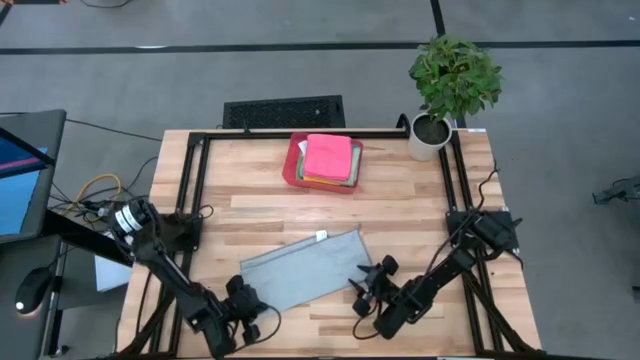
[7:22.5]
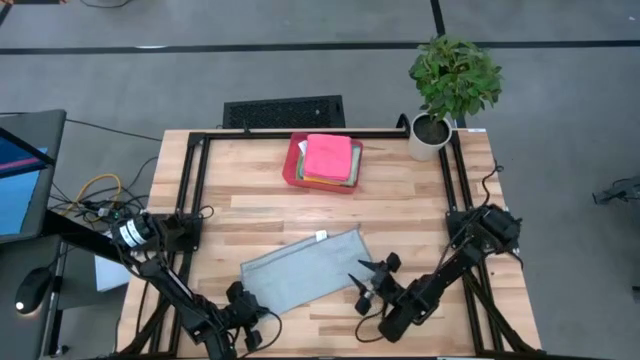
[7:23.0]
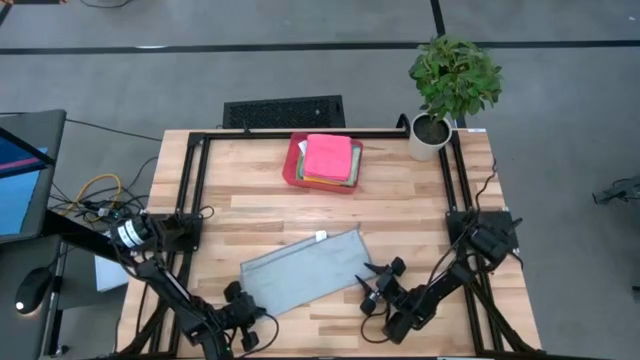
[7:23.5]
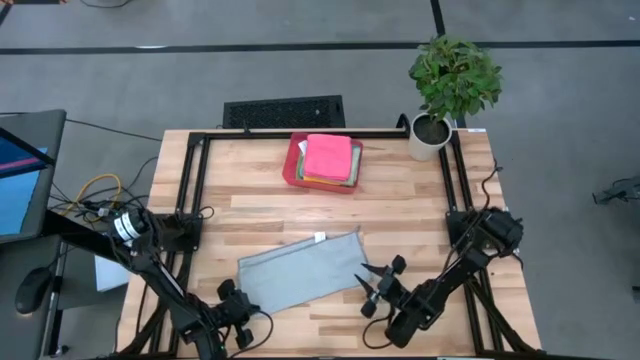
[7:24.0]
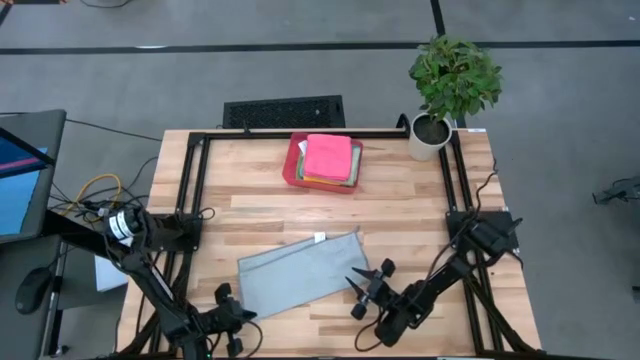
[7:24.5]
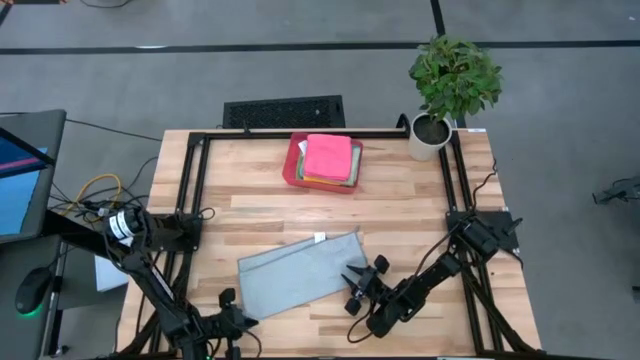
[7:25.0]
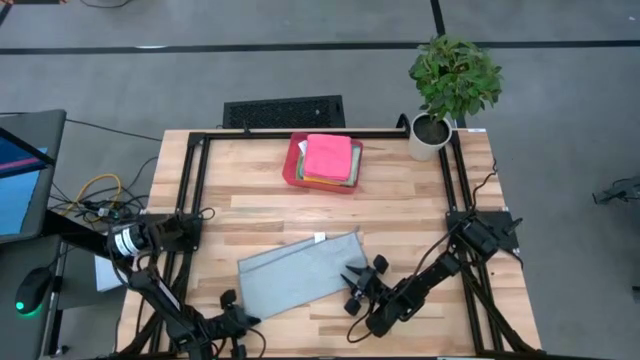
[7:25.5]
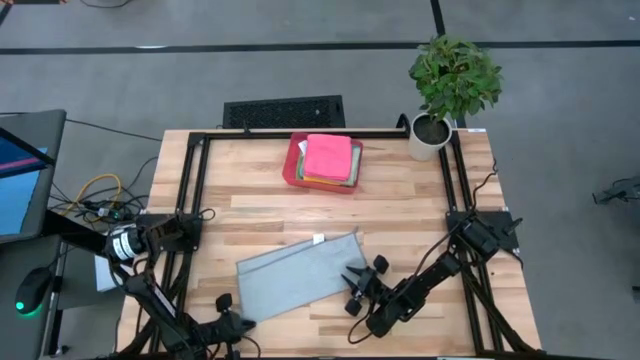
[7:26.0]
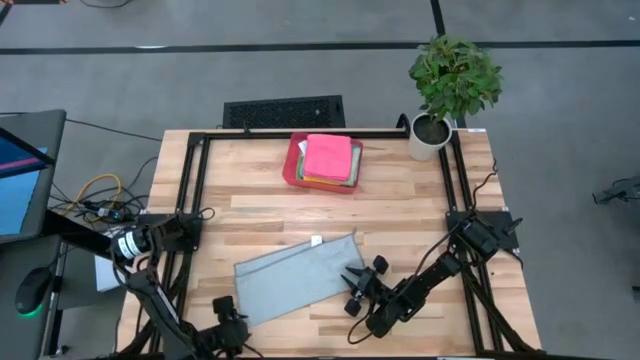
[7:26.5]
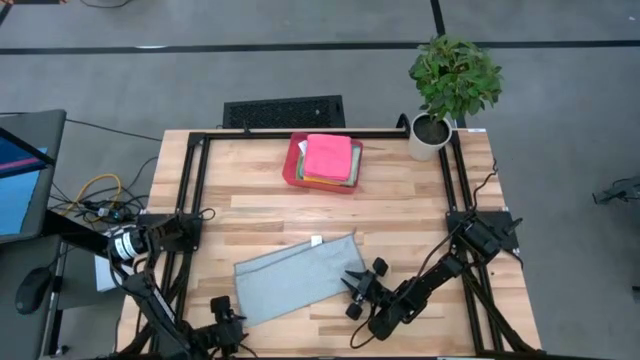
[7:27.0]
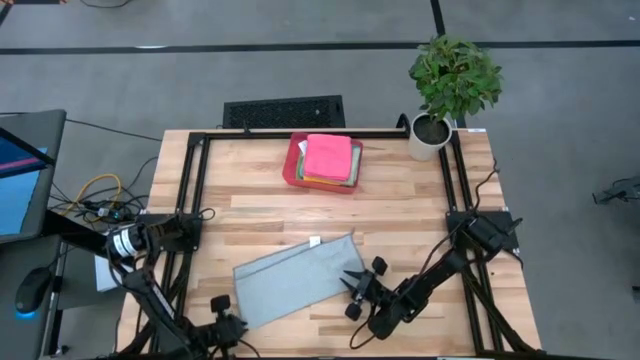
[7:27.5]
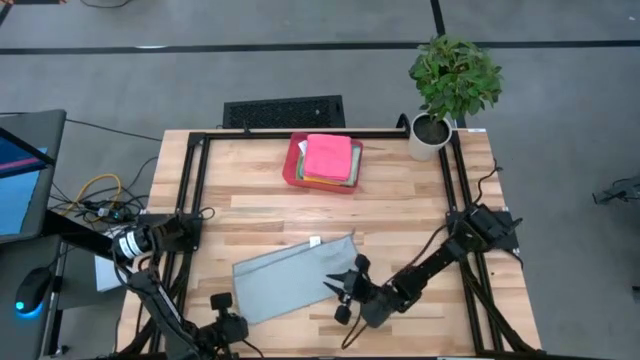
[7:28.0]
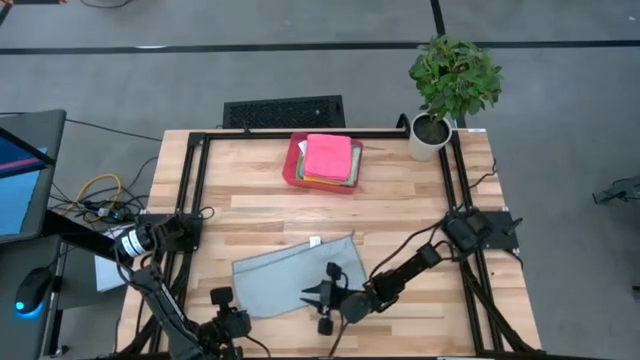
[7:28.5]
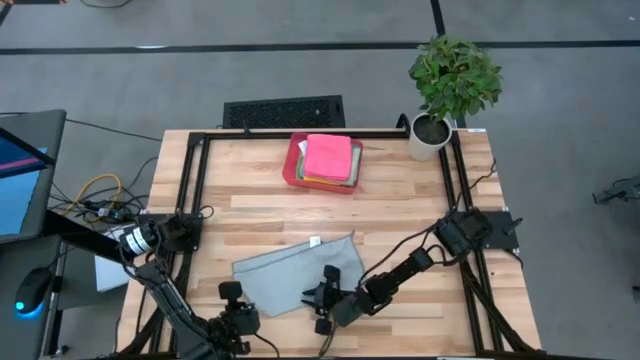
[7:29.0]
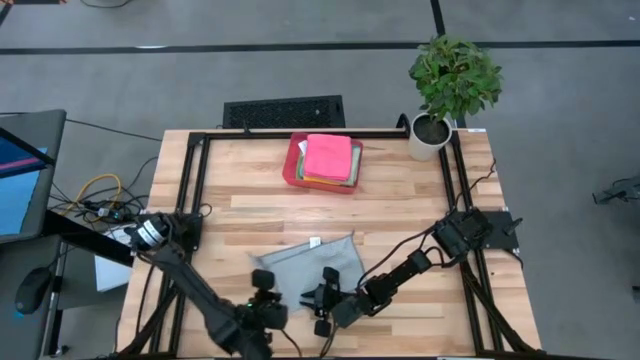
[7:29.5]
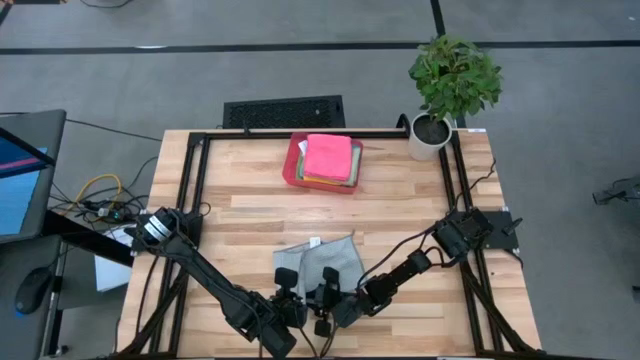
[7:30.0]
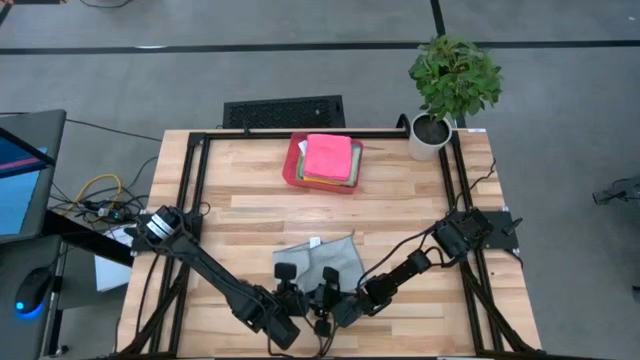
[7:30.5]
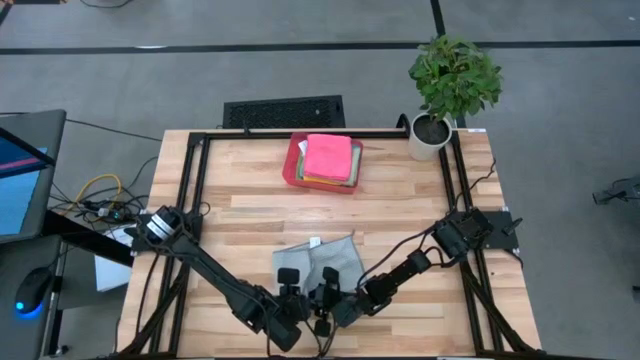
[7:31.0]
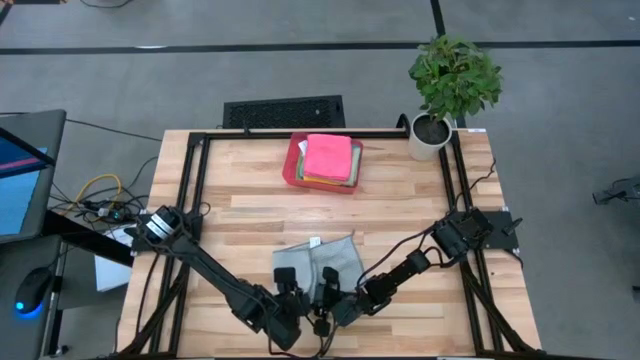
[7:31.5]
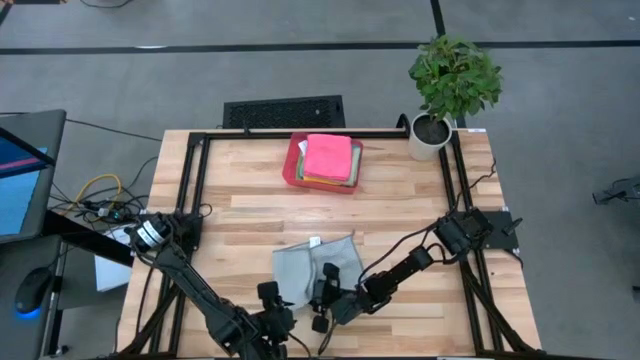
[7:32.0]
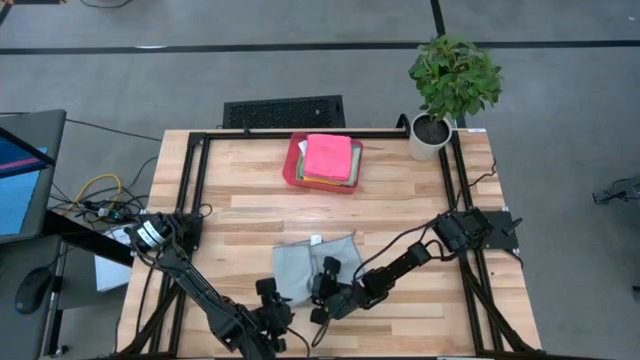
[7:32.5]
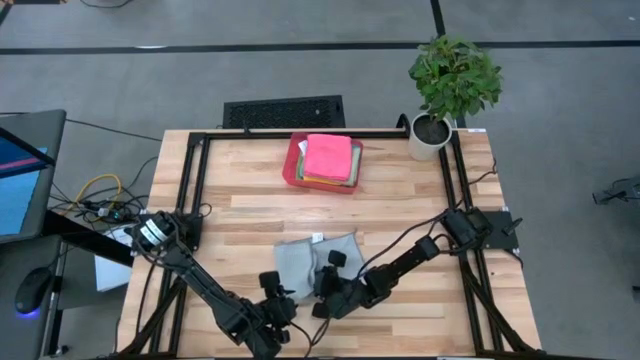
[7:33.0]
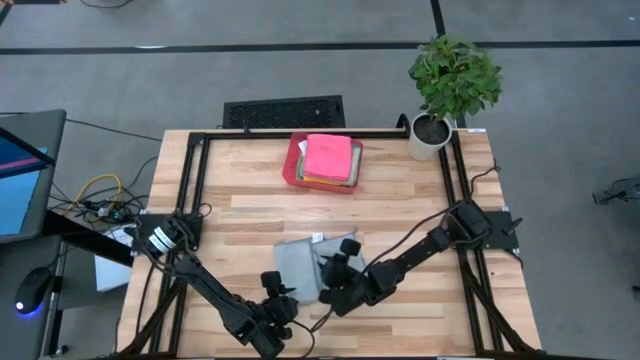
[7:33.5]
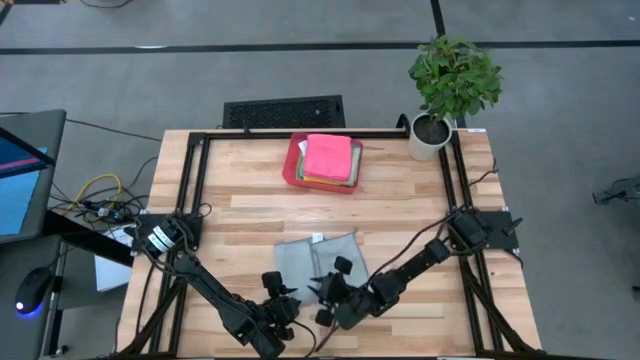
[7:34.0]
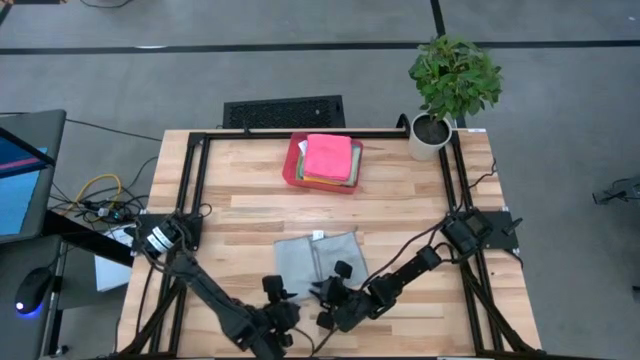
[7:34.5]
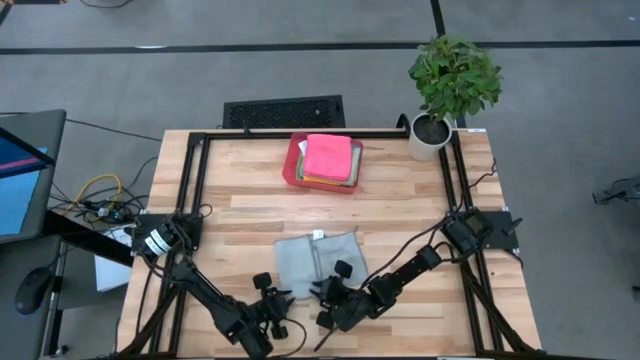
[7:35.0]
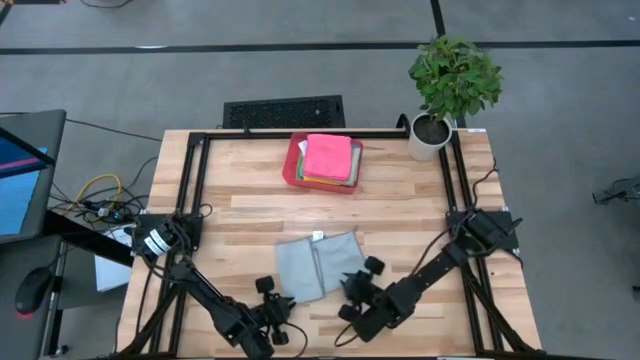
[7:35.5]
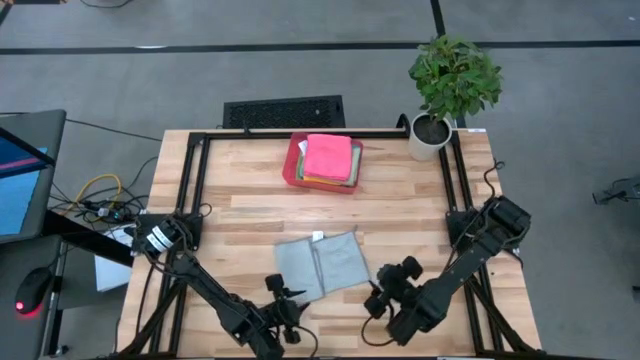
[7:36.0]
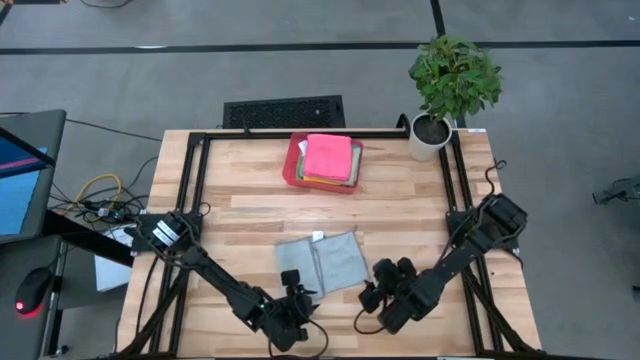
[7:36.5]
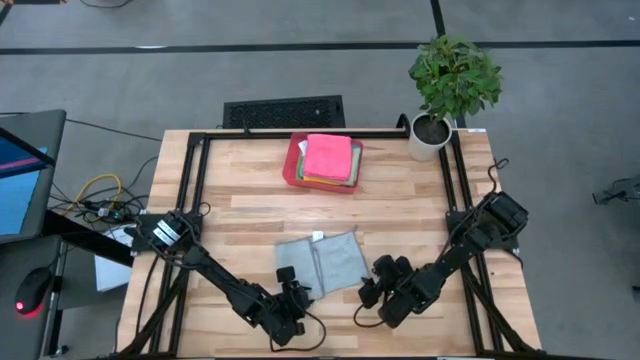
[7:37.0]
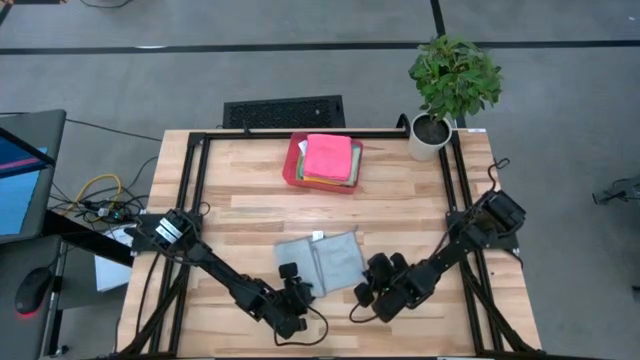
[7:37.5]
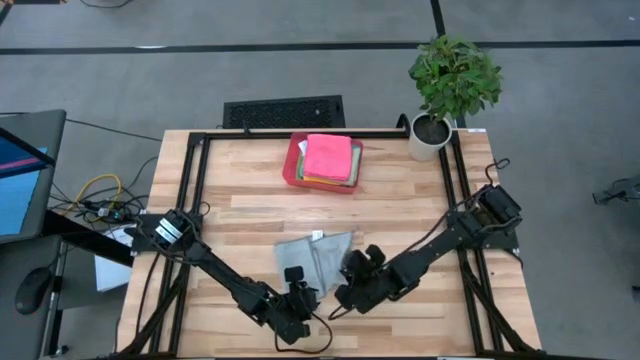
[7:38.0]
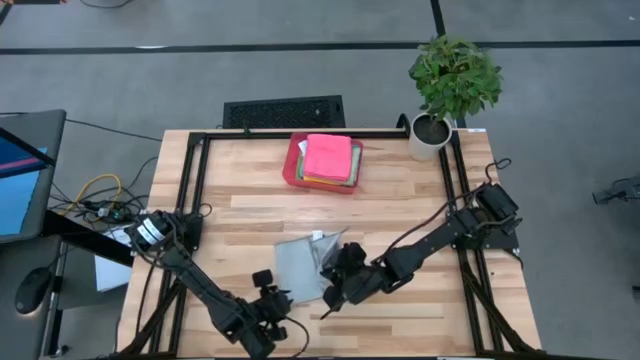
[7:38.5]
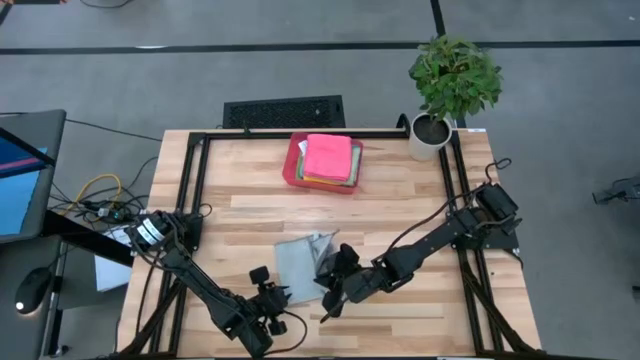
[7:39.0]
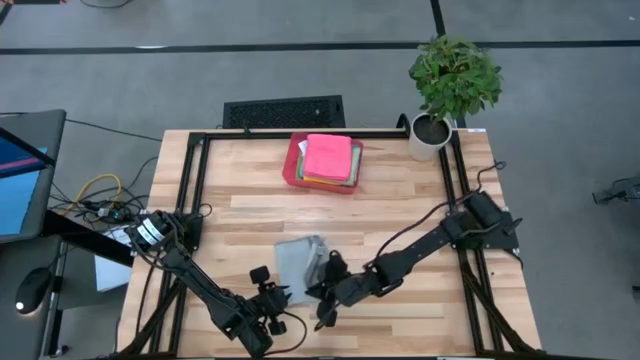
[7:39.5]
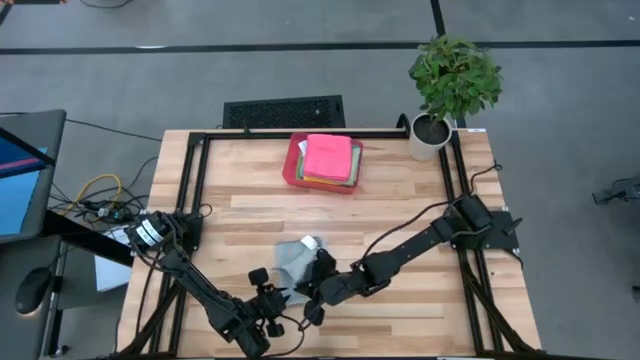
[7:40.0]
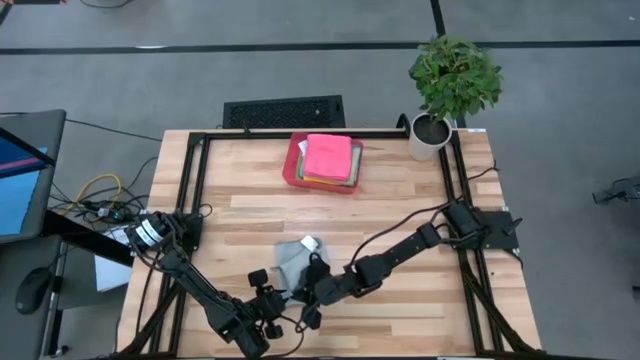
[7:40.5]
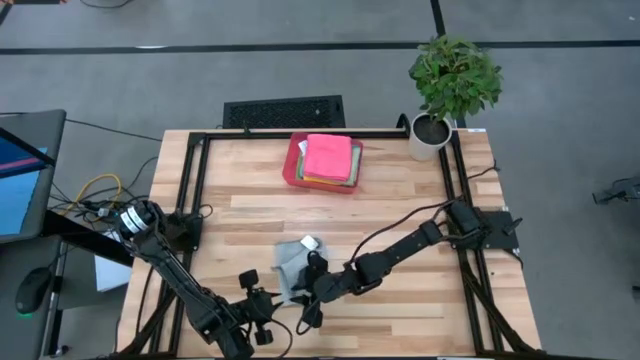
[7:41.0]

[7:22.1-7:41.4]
Task: Fold microfiber towels
Fold the gray microfiber cloth

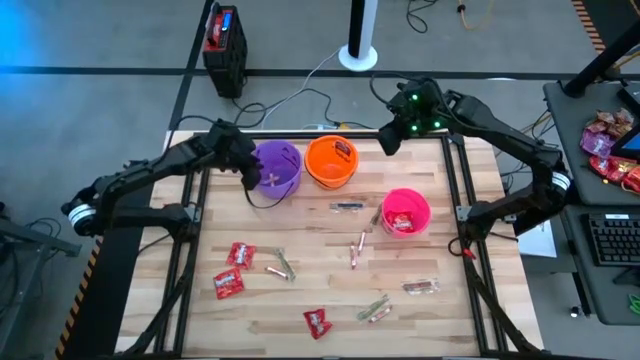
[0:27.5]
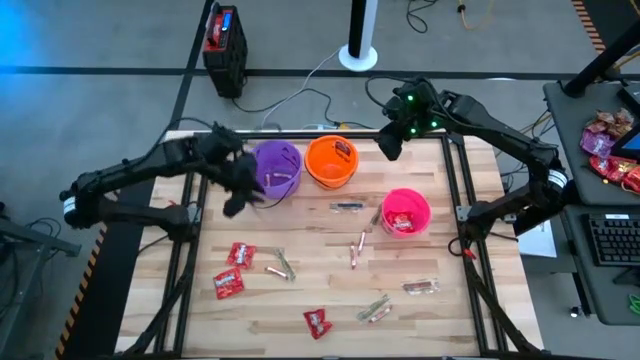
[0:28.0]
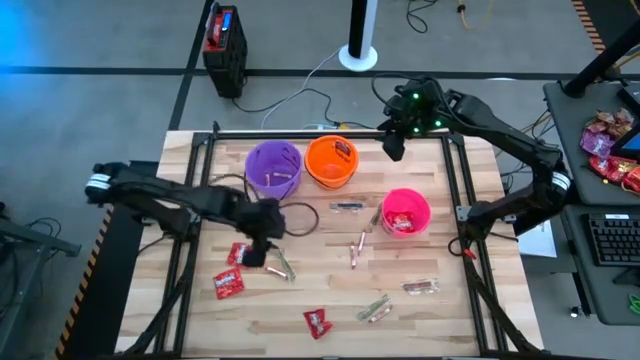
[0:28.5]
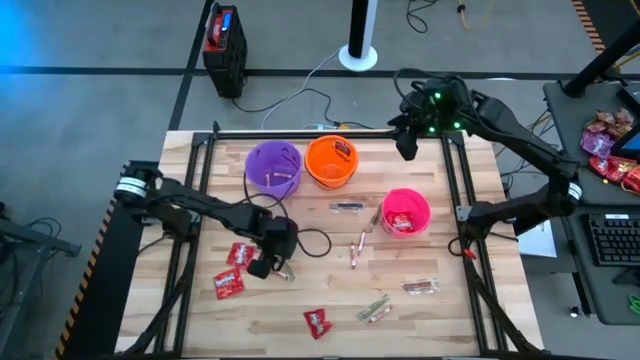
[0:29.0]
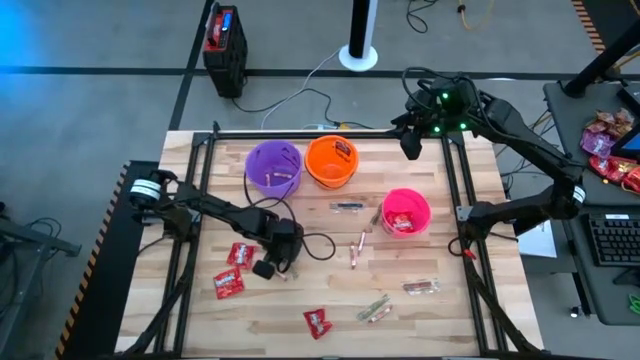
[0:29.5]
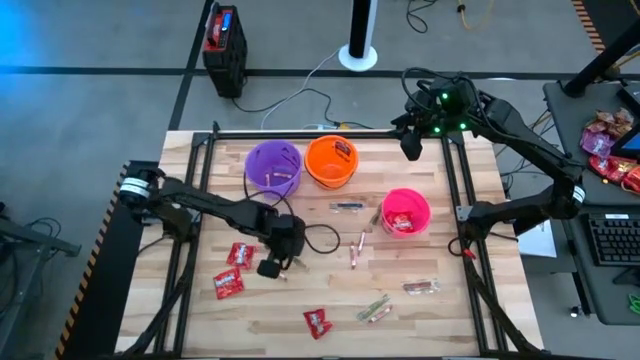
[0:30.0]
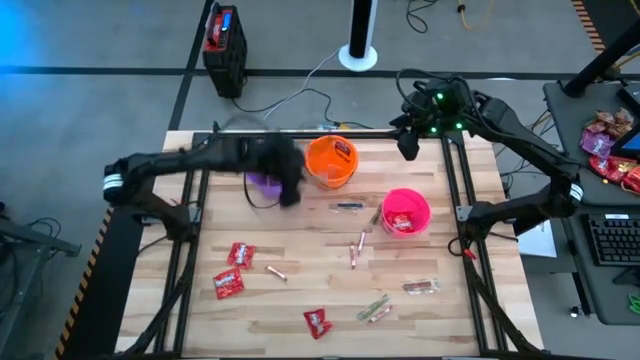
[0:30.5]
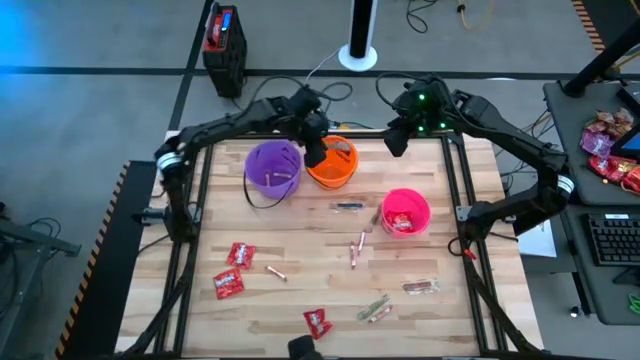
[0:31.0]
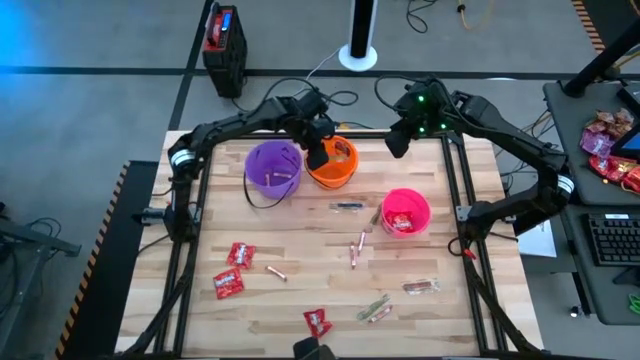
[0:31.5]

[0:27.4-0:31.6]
Task: Sort candy by brand, put in halloween buckets
Put the green candy into the orange bucket
